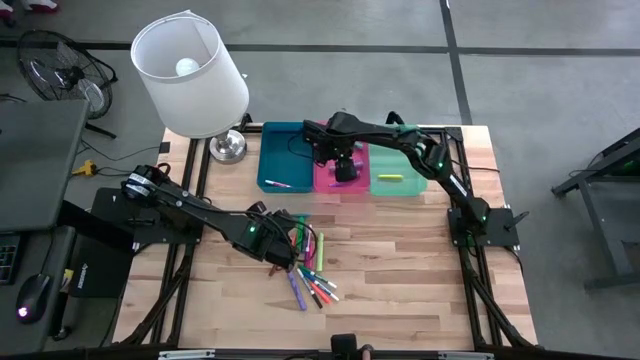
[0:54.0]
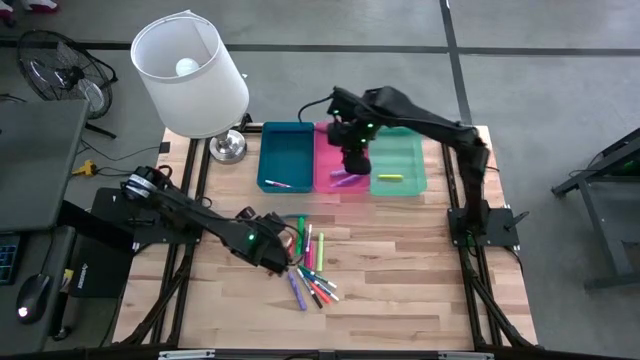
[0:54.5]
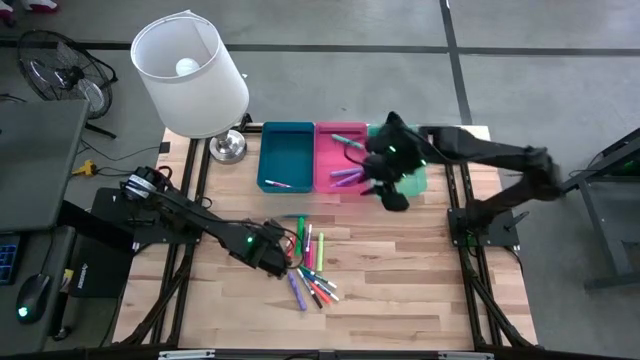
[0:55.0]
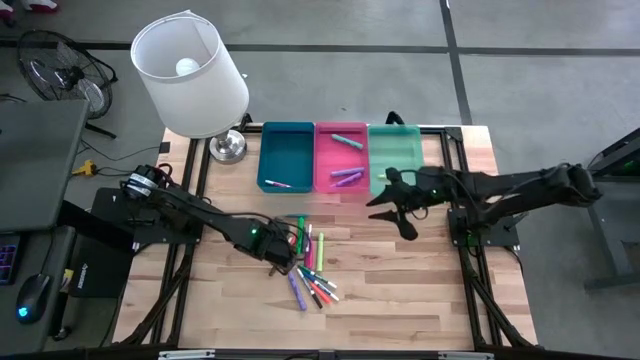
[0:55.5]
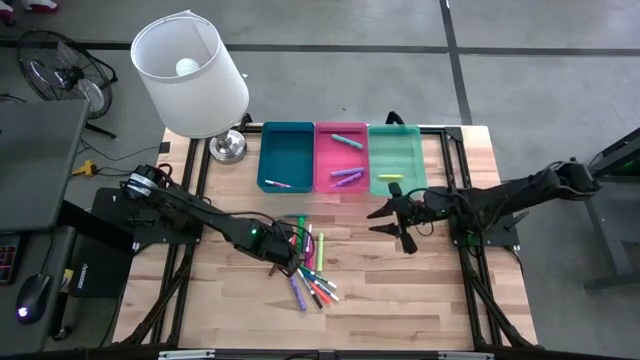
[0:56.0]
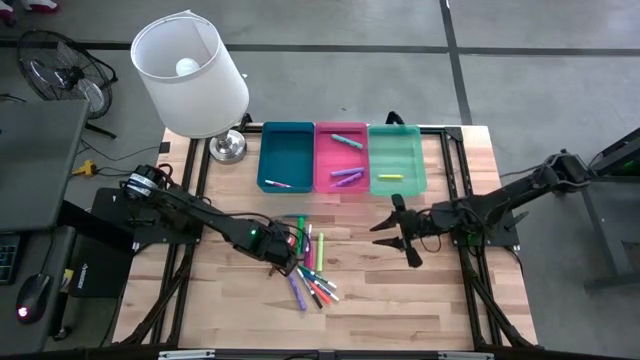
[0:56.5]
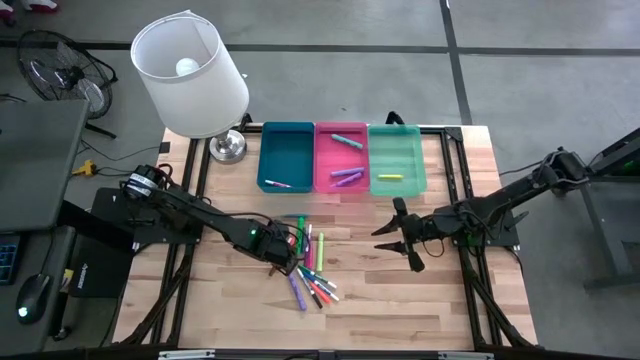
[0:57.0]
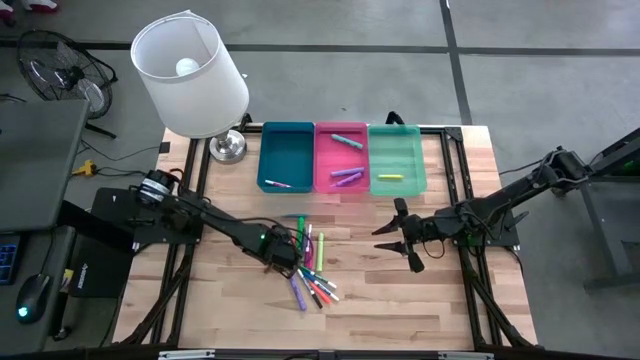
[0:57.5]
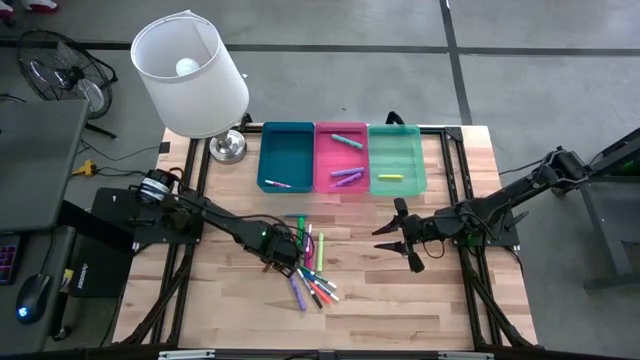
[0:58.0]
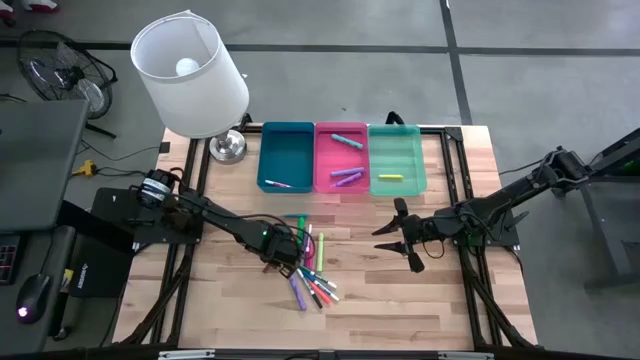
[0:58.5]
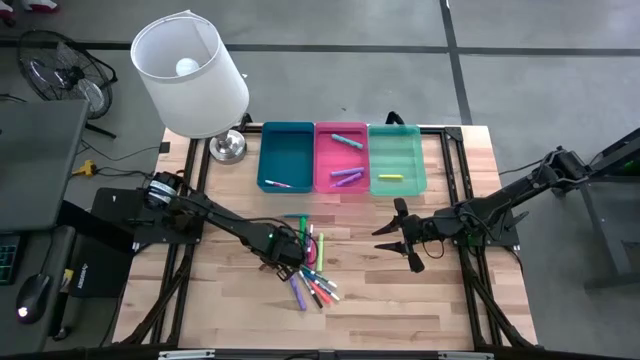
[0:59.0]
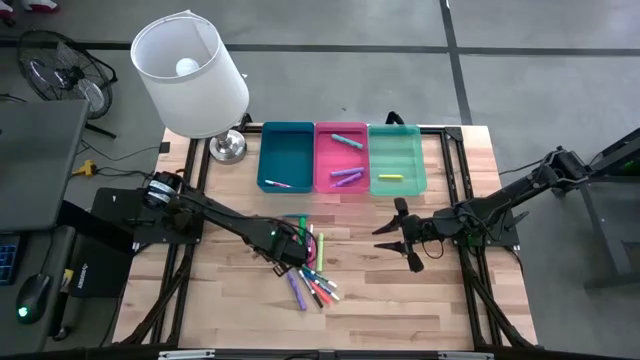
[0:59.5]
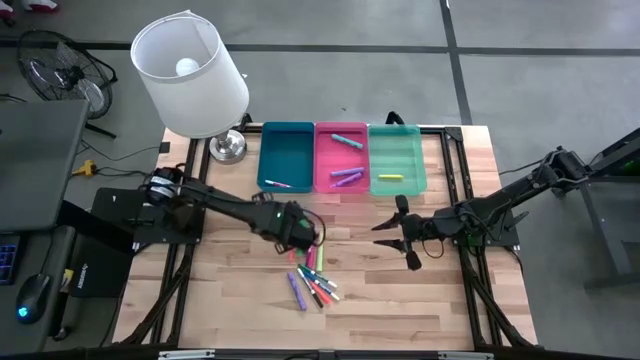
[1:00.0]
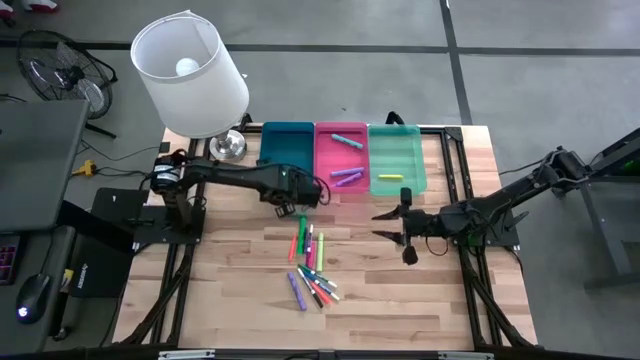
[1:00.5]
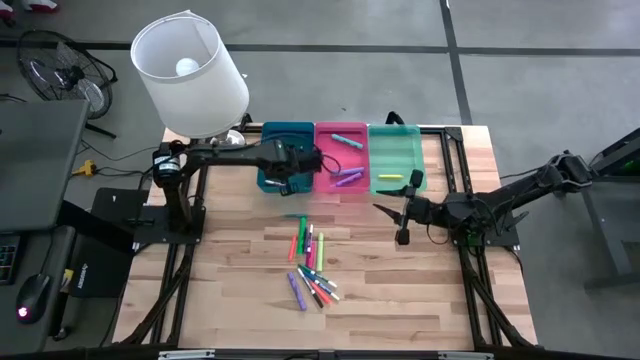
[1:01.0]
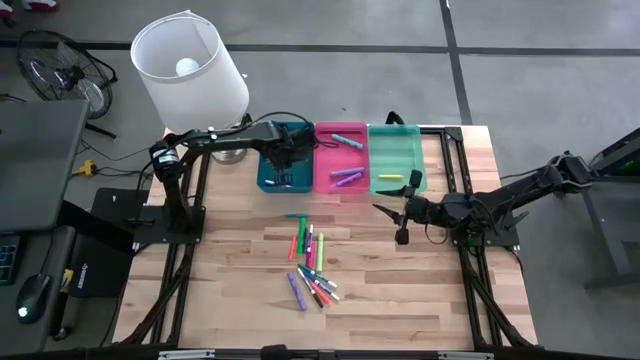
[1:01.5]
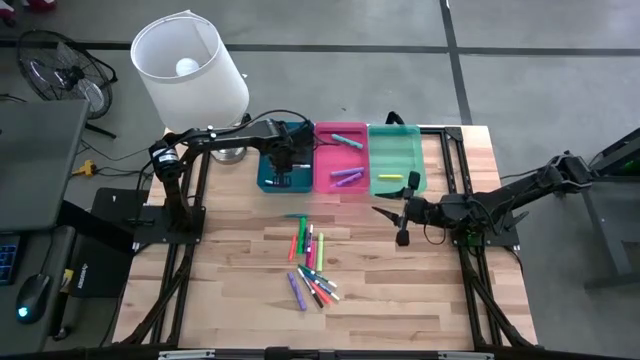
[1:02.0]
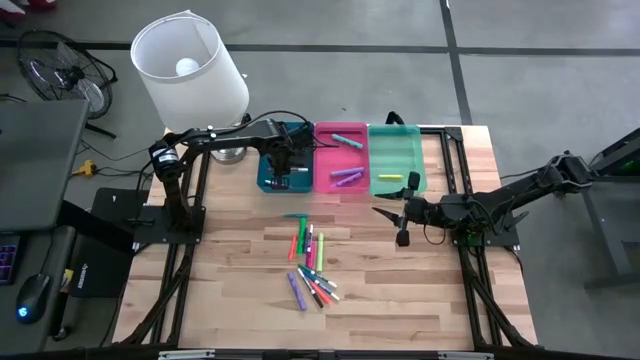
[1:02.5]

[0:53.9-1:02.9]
Task: Pick & Place Markers
Put the orange dry erase marker into the dark blue bin

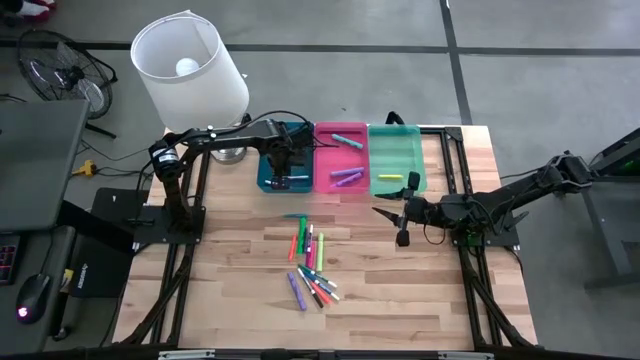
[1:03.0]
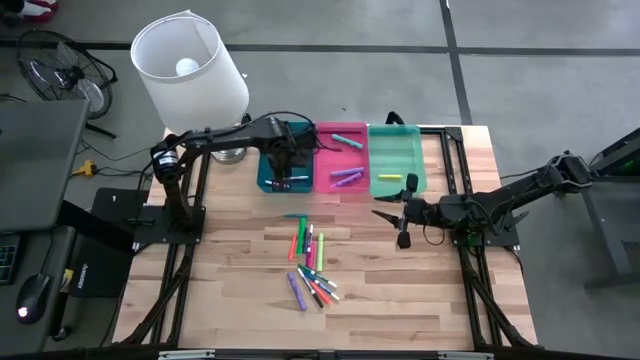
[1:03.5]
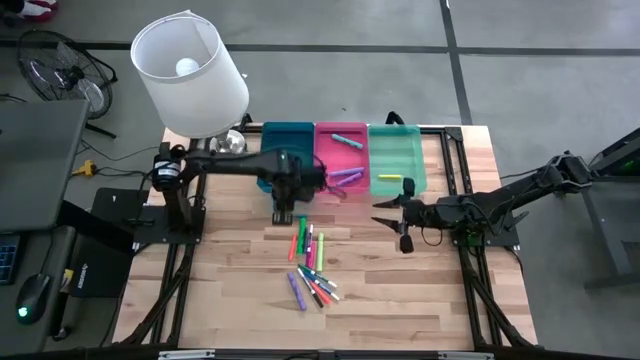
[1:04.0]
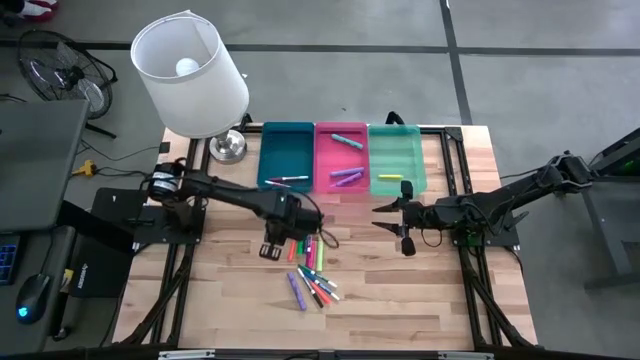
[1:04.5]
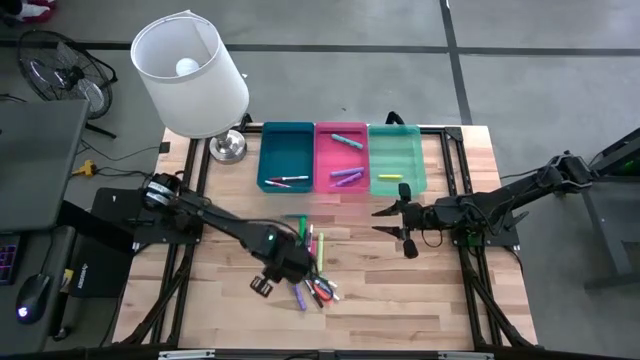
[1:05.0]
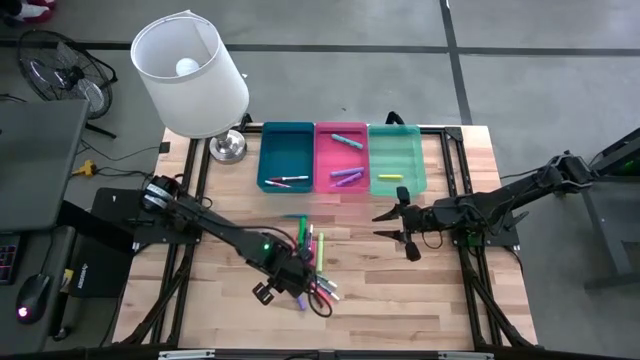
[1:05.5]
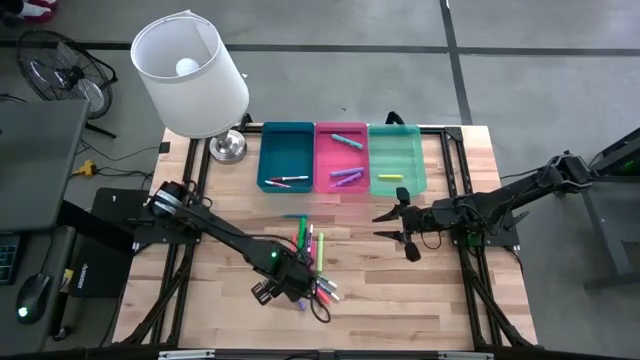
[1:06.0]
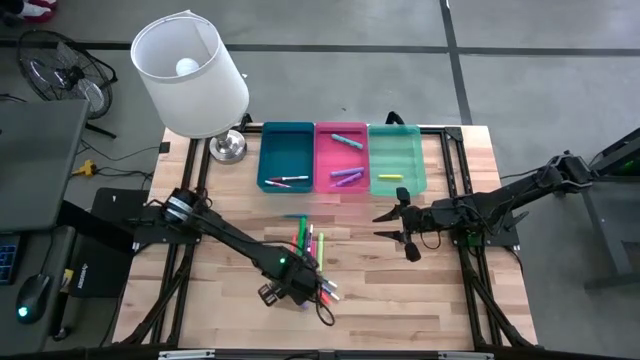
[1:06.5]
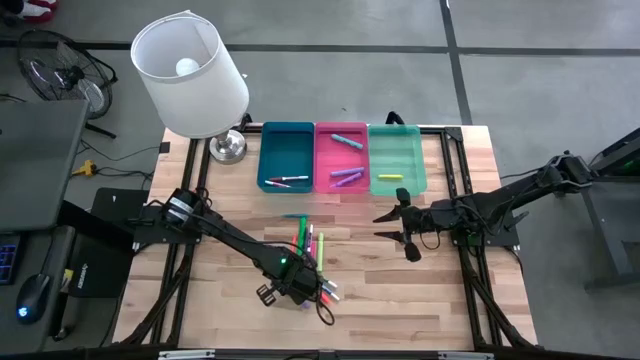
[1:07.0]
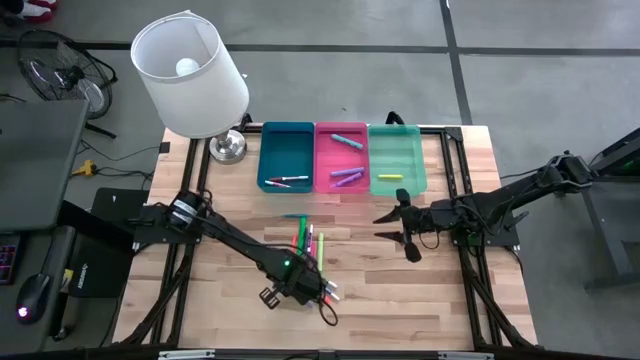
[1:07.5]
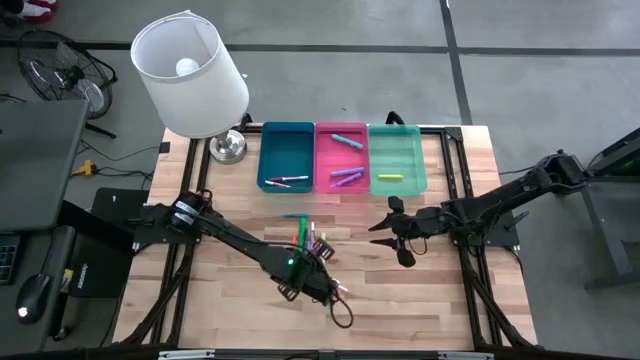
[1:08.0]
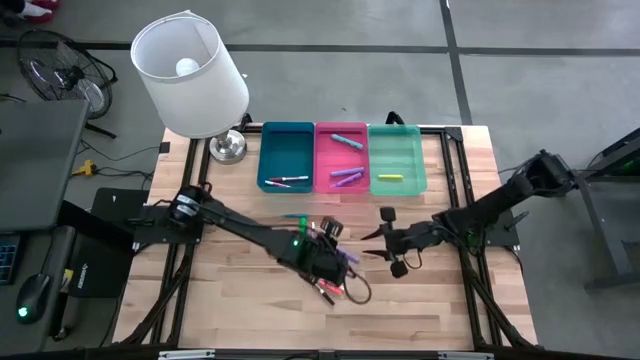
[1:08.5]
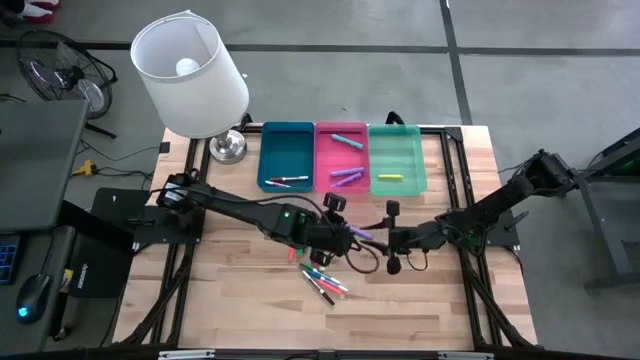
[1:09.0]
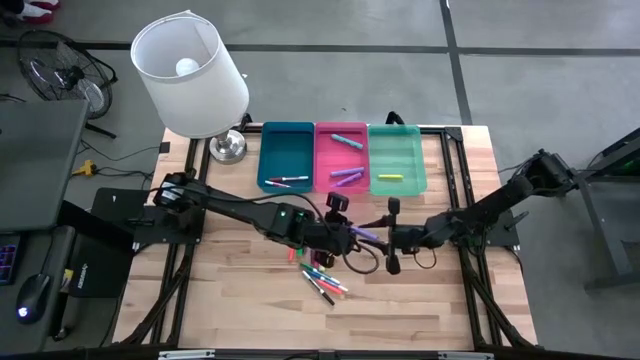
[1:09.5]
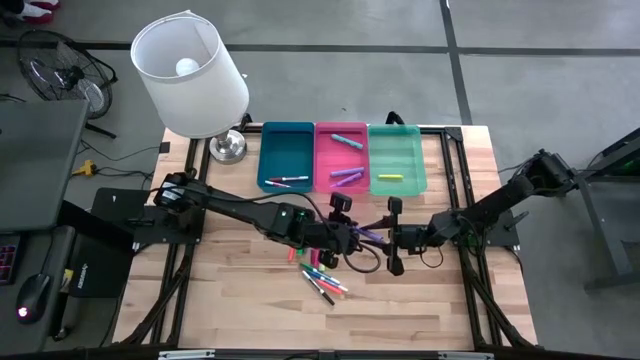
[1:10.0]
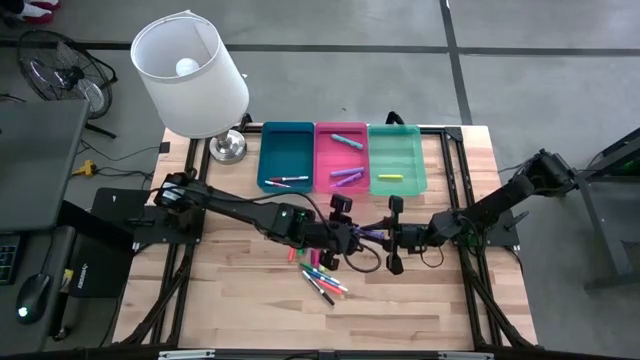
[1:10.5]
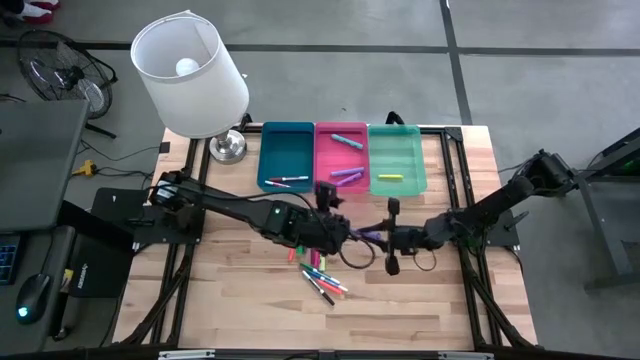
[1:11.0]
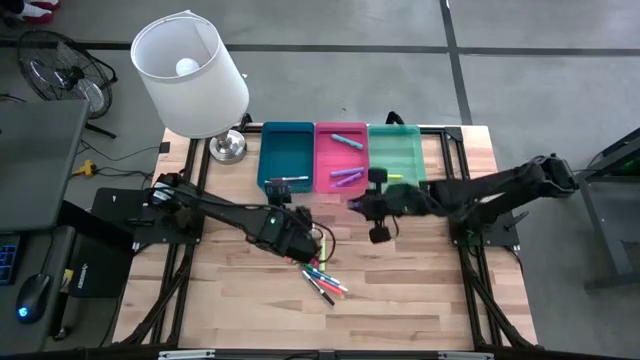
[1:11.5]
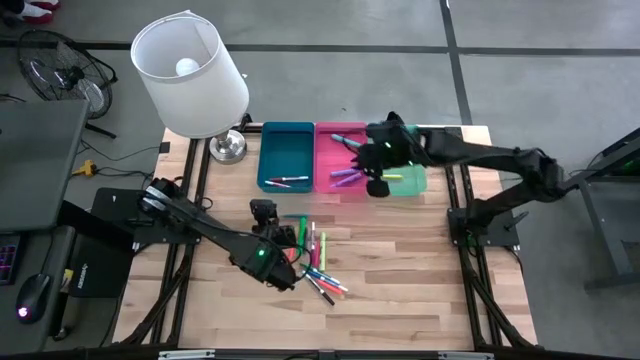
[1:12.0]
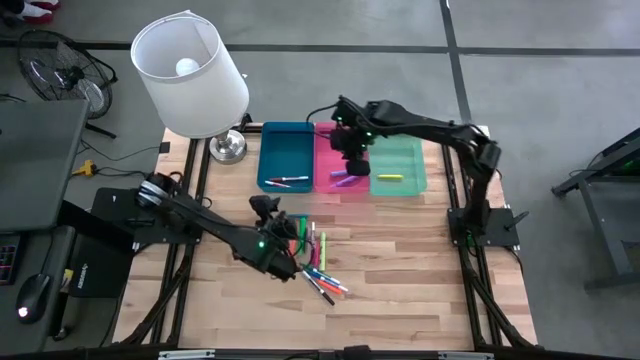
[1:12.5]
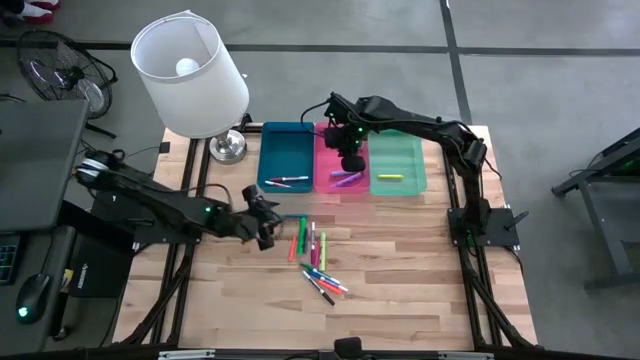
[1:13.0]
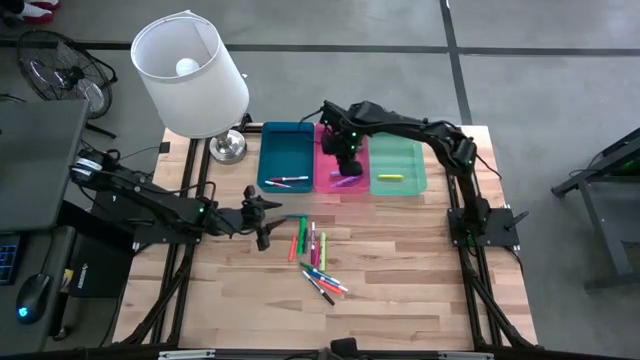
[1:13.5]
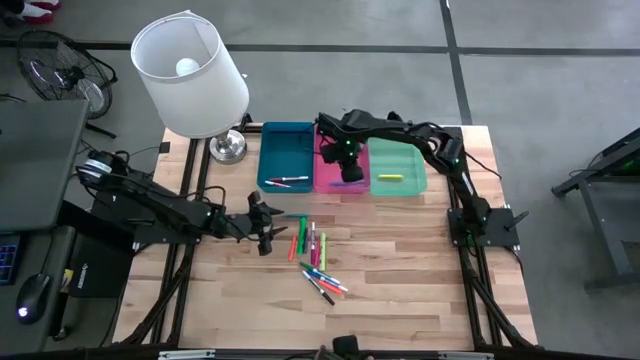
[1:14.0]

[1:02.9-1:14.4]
Put the violet highlighter into the pink bin
